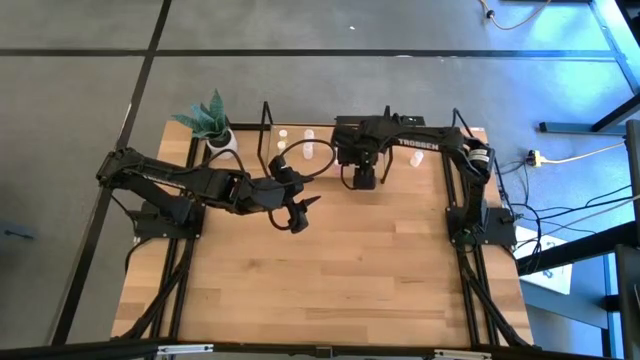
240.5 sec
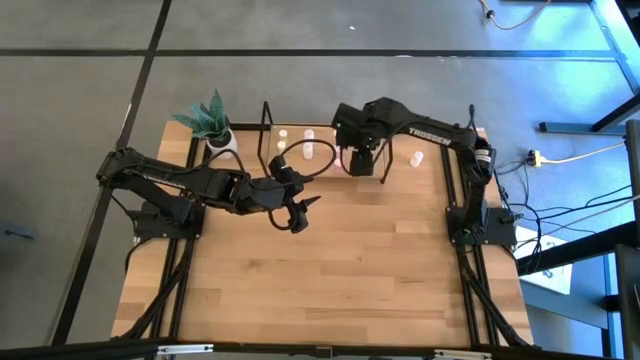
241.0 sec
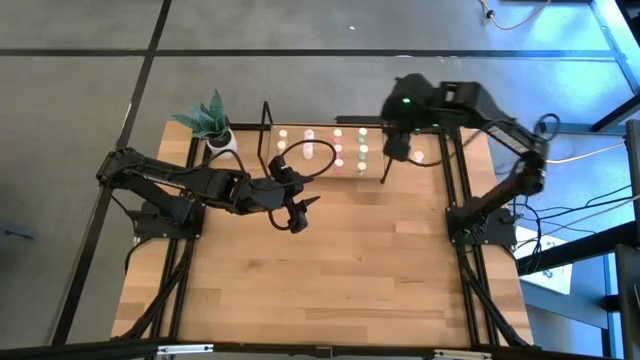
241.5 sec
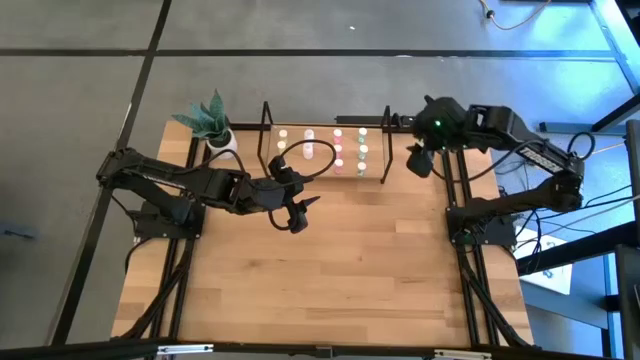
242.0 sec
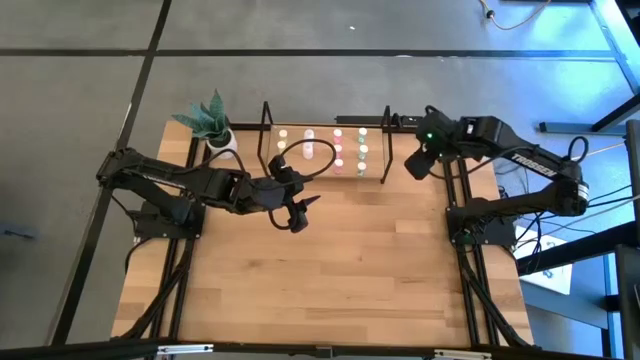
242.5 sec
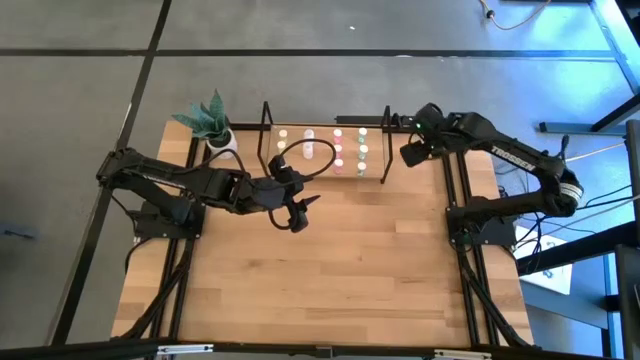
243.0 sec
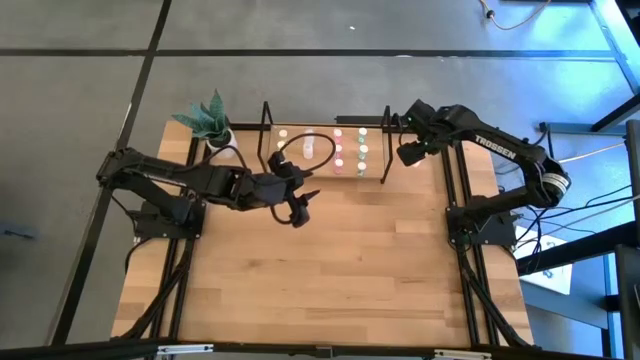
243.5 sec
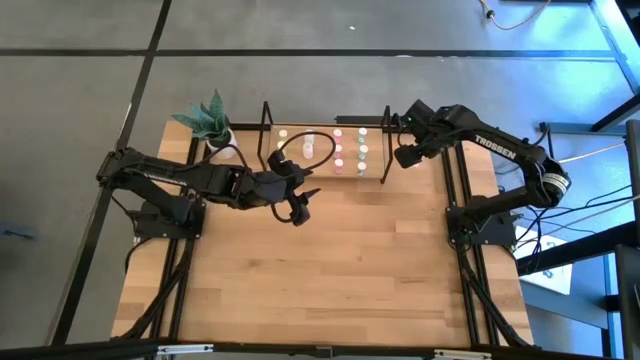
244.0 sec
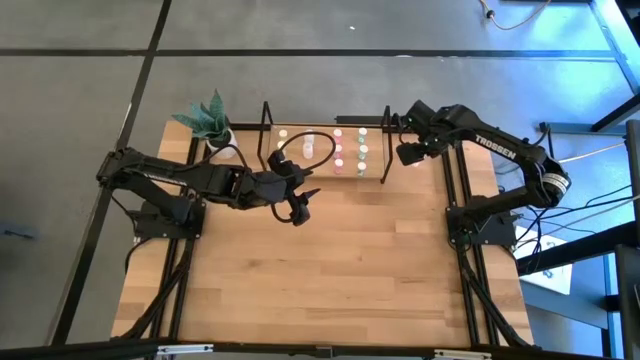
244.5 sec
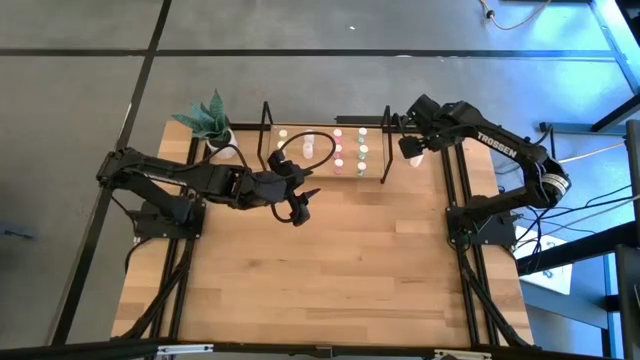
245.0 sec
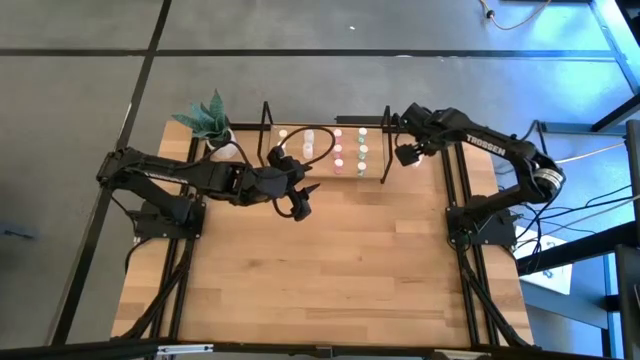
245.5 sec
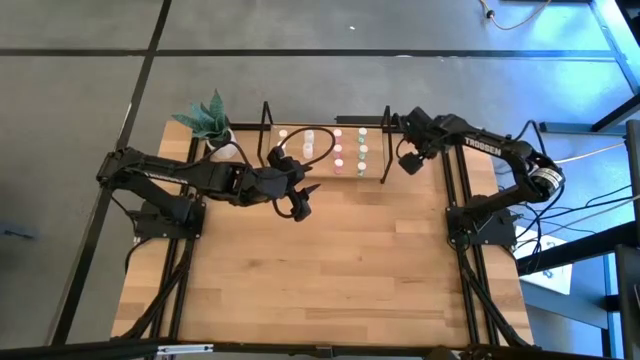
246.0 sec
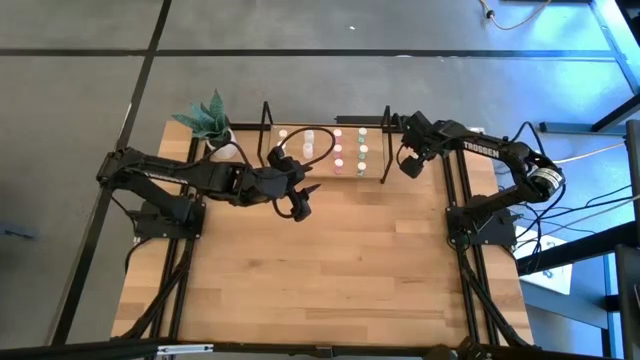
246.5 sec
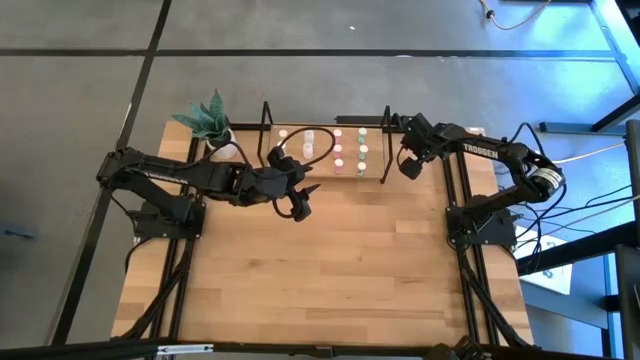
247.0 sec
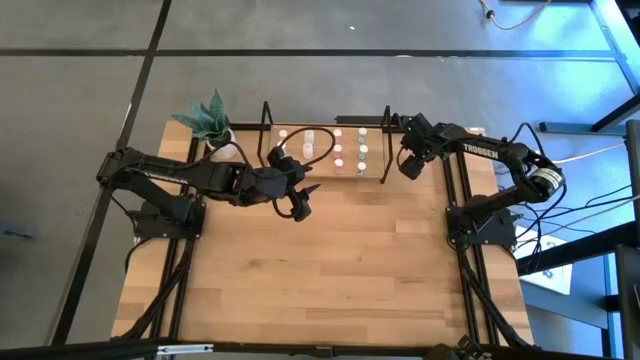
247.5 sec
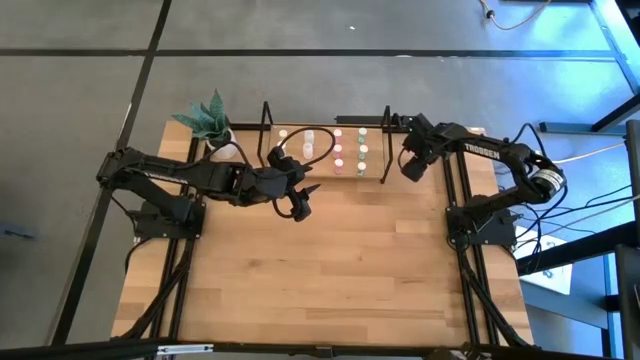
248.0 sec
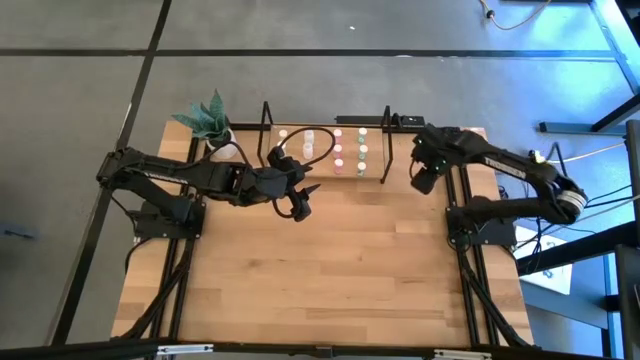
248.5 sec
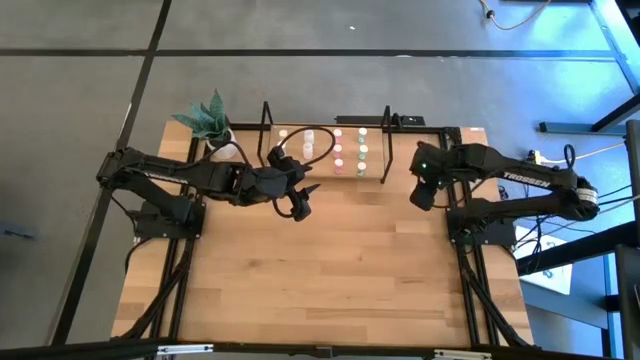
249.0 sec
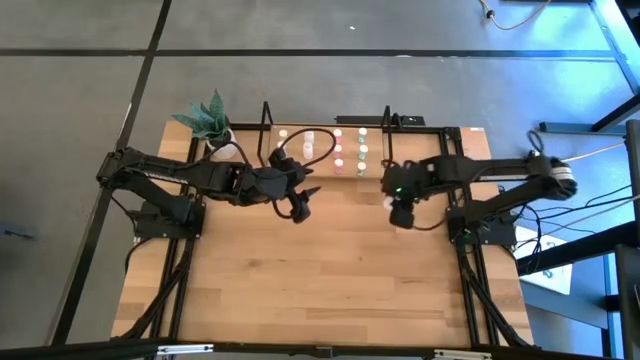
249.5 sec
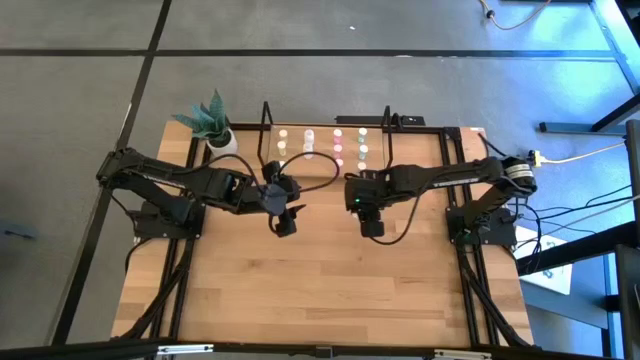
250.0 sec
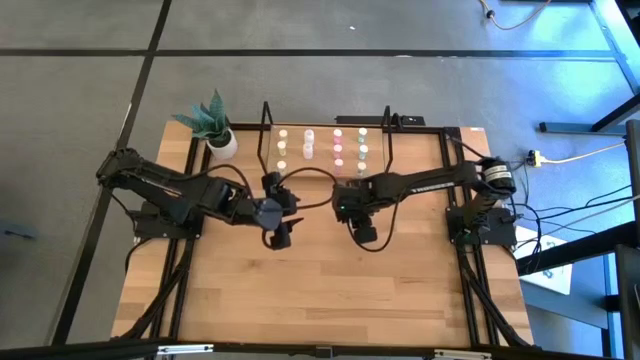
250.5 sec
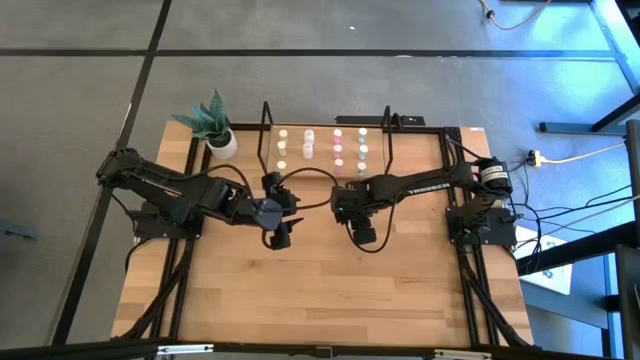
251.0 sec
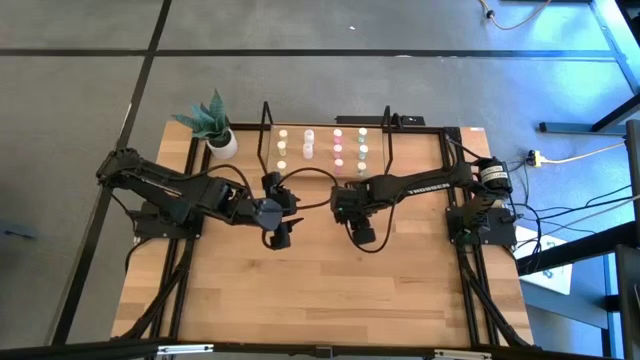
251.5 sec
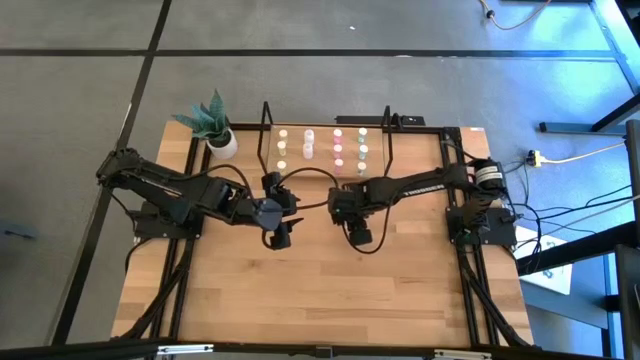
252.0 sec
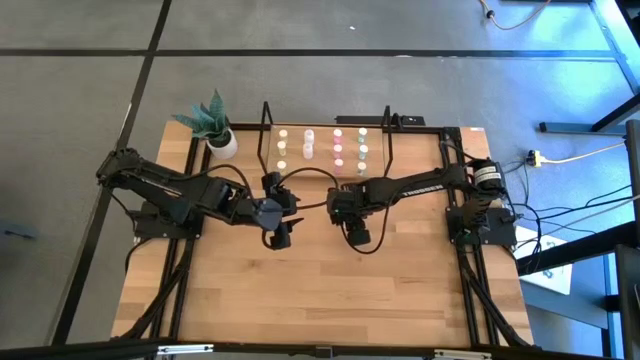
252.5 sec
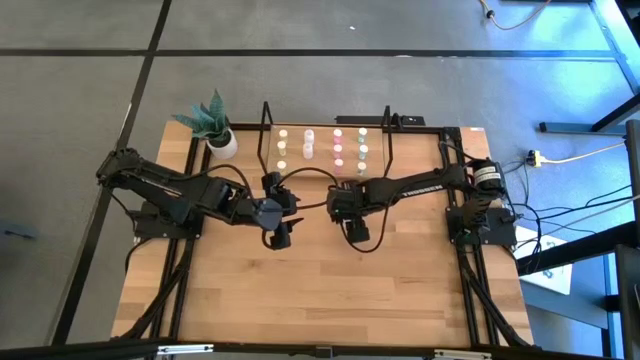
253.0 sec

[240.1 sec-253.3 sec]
Task: Pick and place medicine bottles onto shelf by color
Put the white bottle on the shelf aligned with other white pill bottles

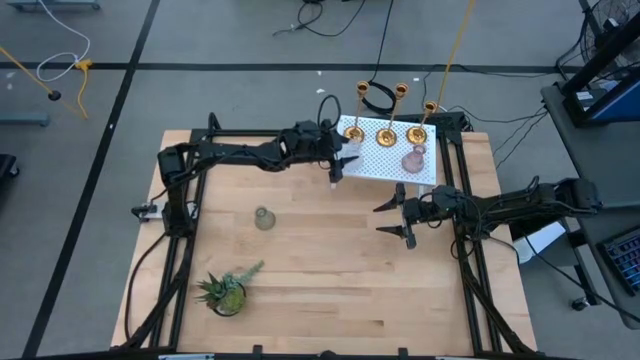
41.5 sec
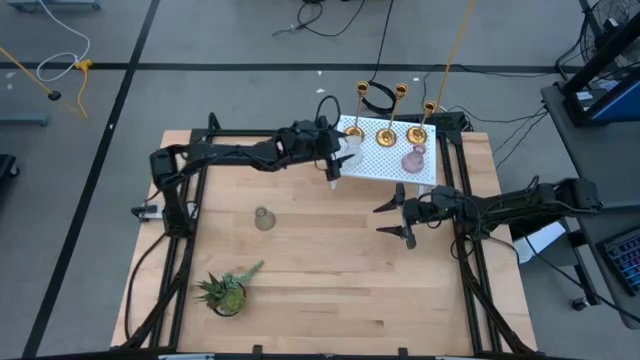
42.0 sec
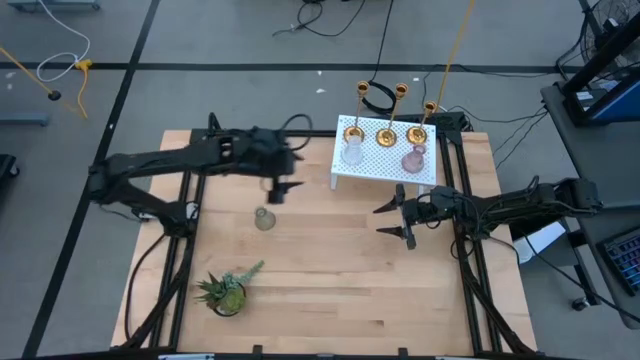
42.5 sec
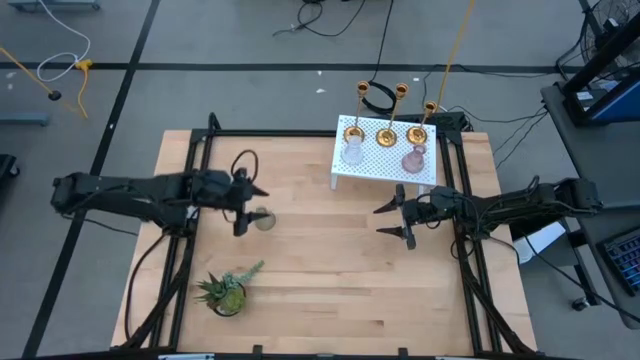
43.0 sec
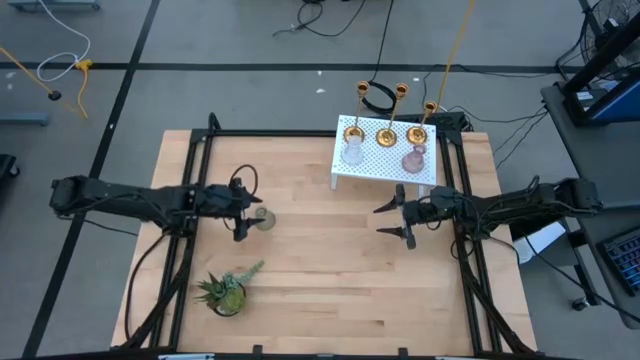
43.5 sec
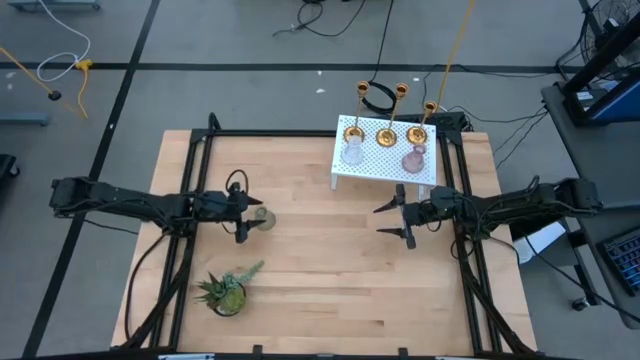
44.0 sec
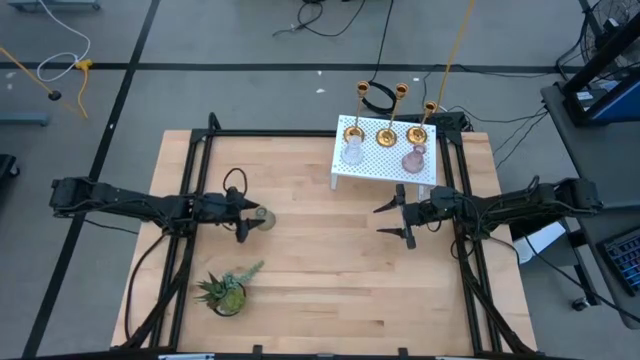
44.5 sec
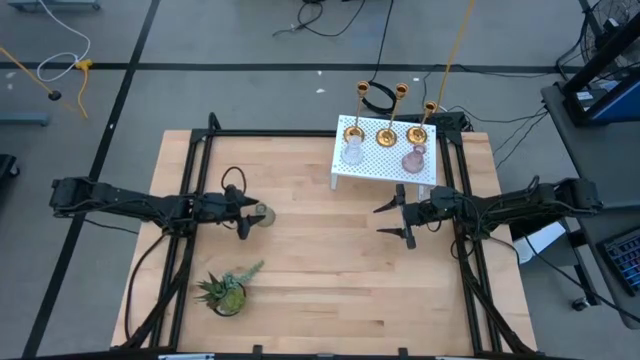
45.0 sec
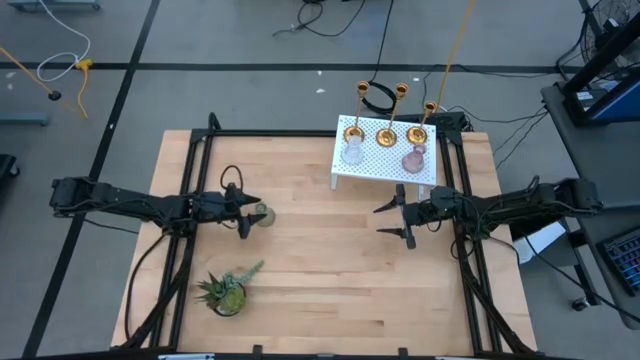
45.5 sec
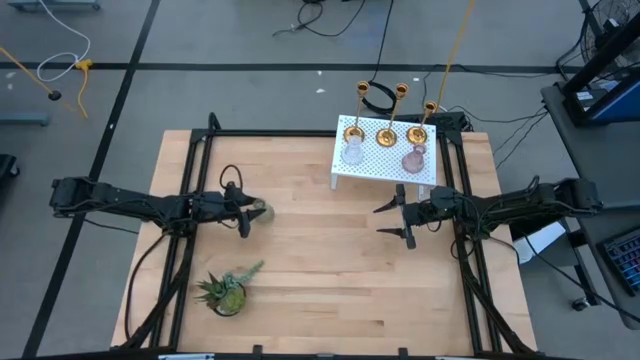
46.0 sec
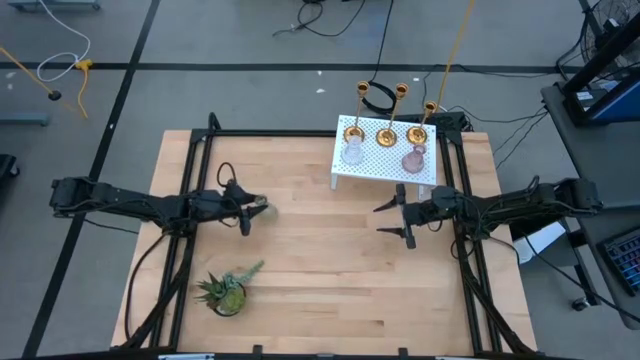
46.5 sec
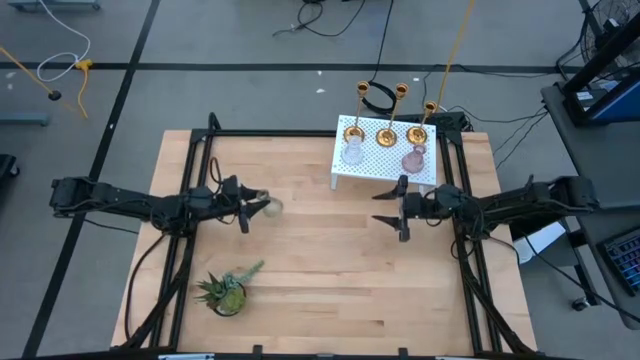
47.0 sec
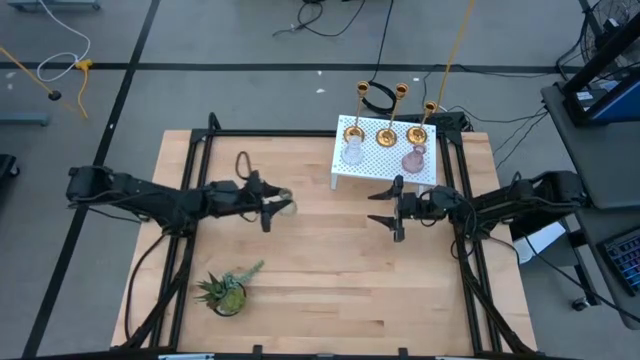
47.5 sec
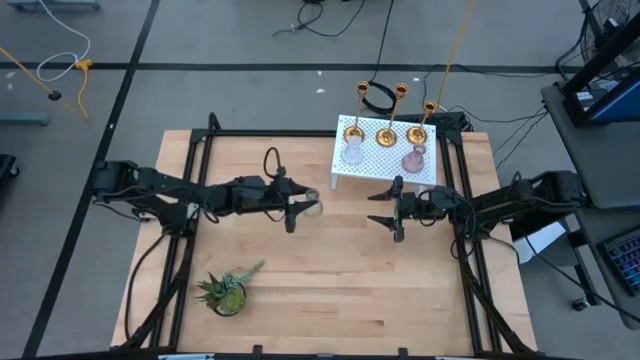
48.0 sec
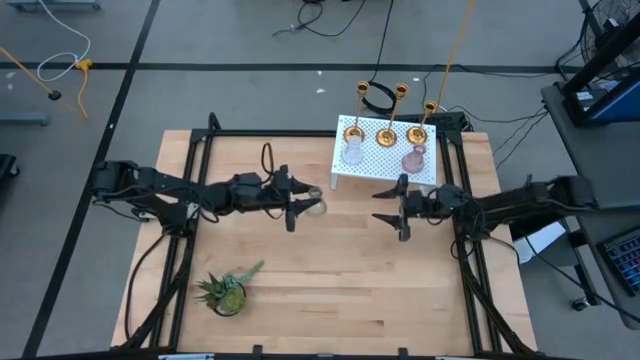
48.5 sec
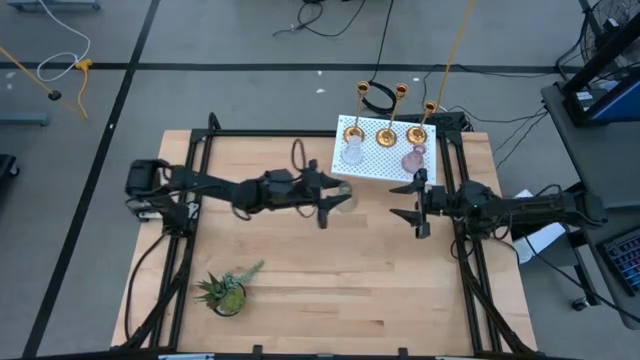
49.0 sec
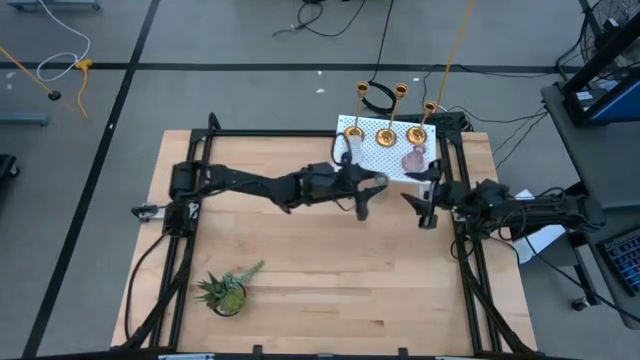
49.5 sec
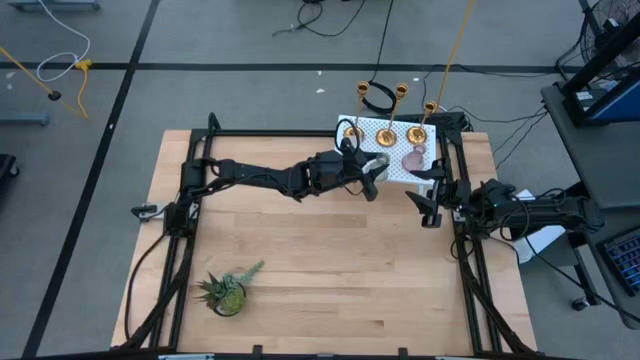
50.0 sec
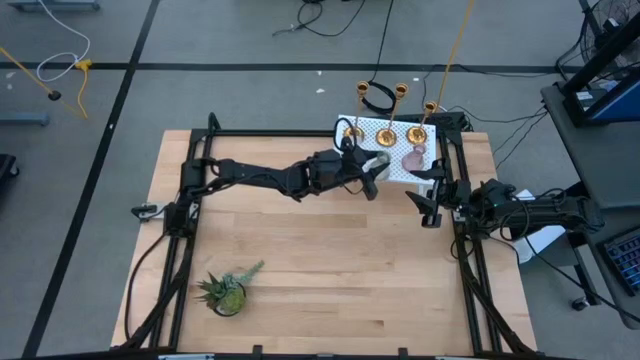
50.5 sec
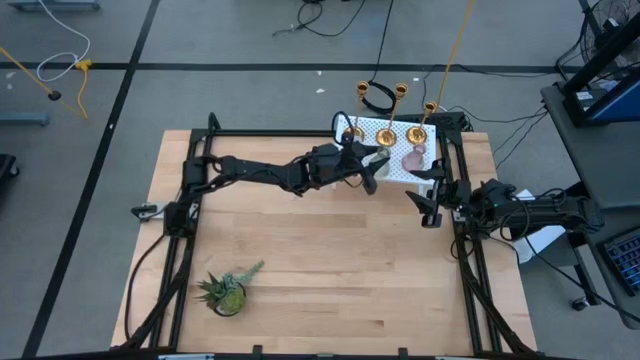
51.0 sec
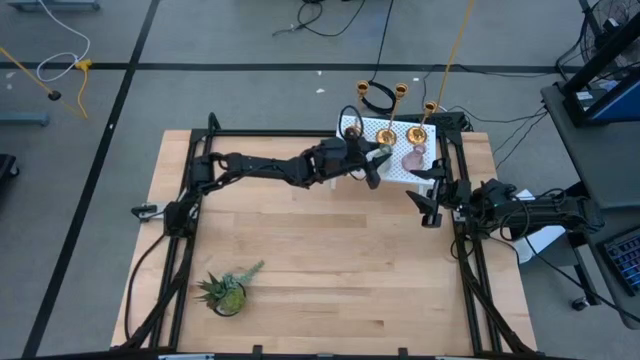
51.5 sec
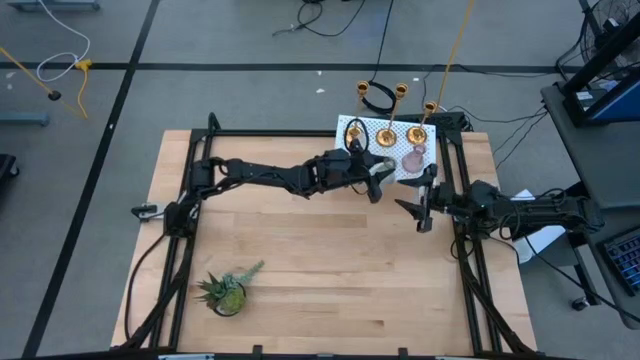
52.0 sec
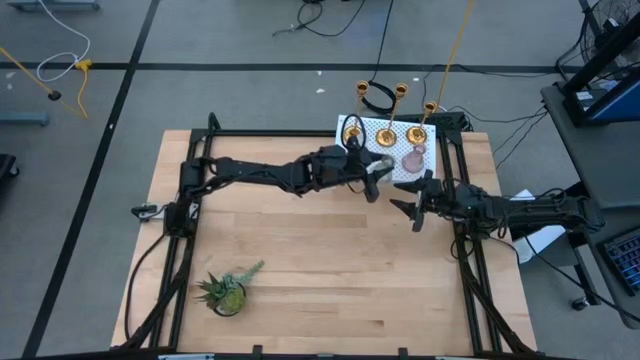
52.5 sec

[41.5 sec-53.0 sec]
Task: Pick & Place candle stick holders
Put the green glass candle holder on the shelf
